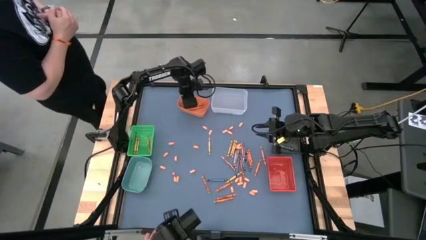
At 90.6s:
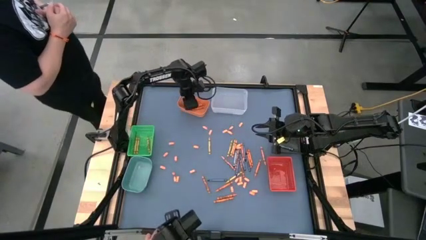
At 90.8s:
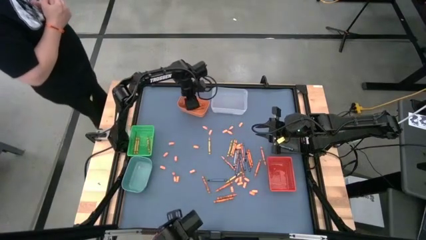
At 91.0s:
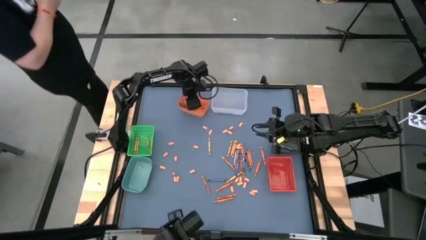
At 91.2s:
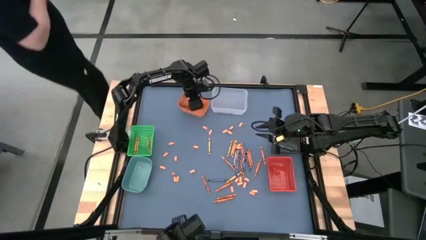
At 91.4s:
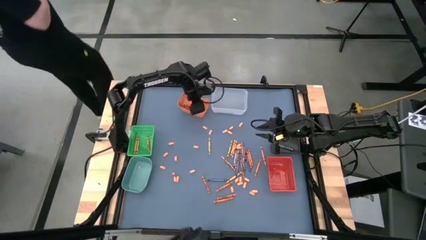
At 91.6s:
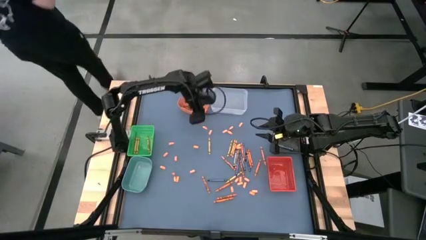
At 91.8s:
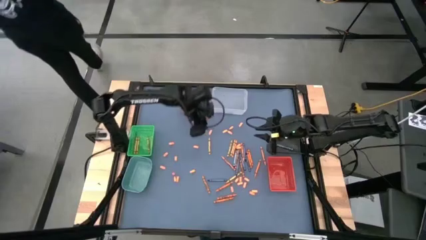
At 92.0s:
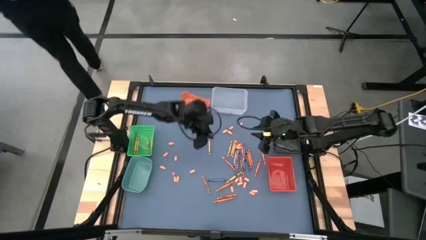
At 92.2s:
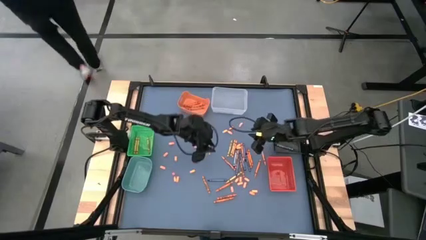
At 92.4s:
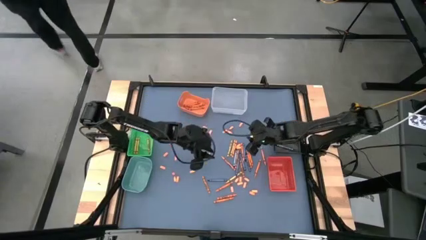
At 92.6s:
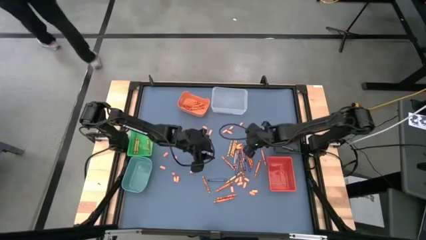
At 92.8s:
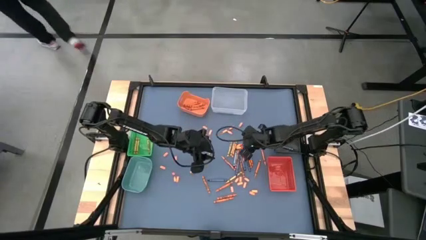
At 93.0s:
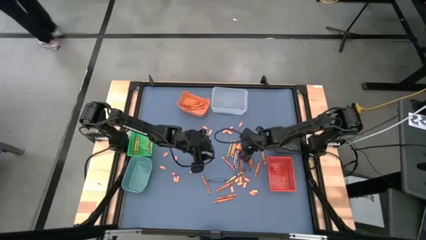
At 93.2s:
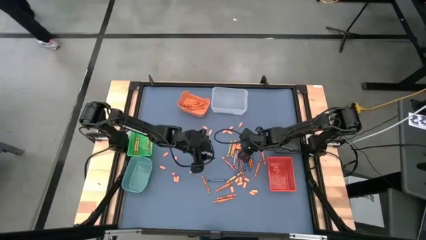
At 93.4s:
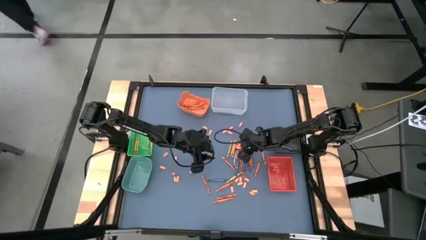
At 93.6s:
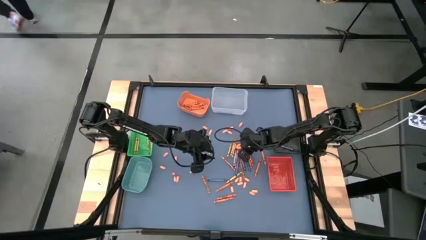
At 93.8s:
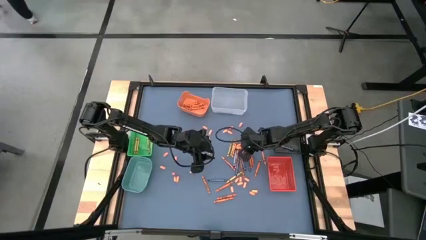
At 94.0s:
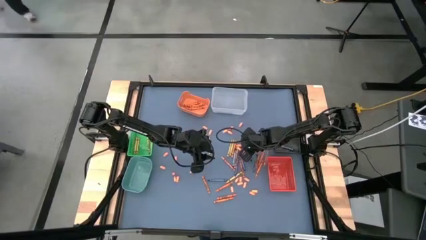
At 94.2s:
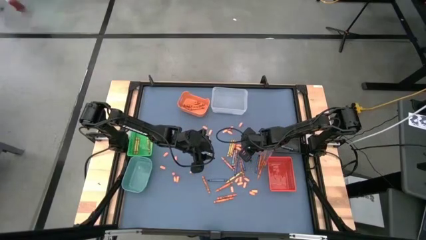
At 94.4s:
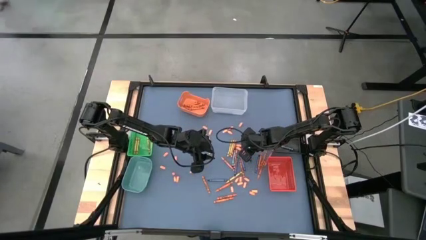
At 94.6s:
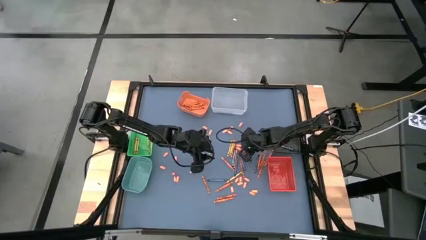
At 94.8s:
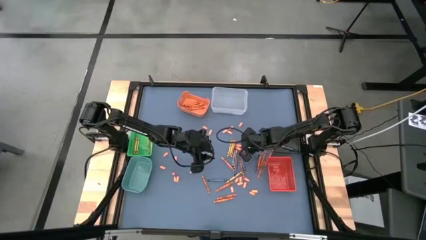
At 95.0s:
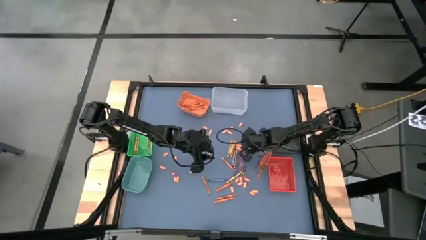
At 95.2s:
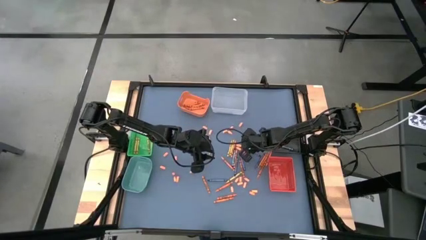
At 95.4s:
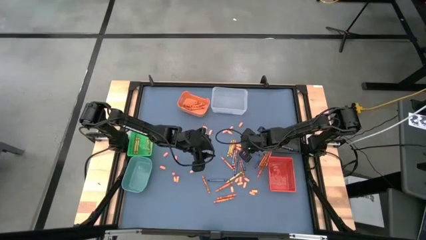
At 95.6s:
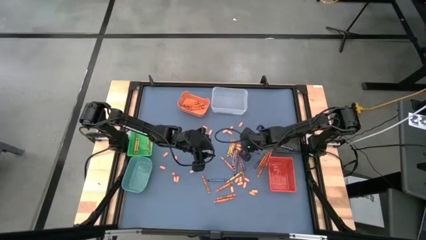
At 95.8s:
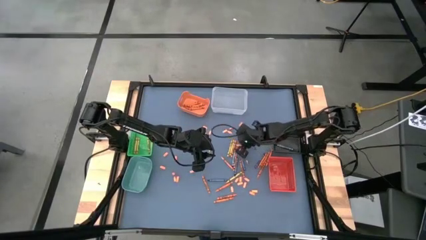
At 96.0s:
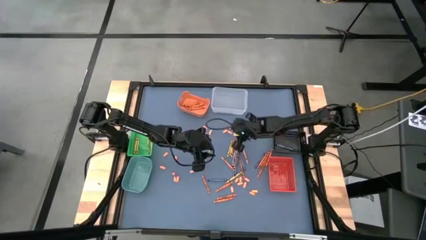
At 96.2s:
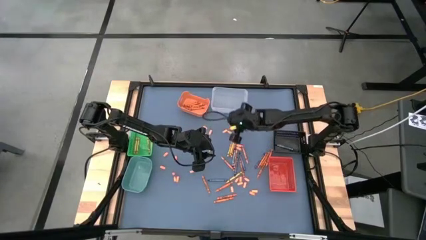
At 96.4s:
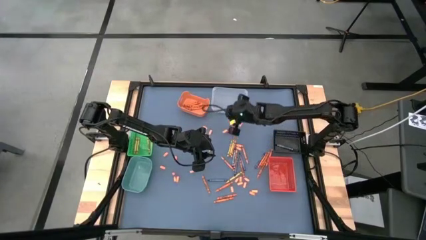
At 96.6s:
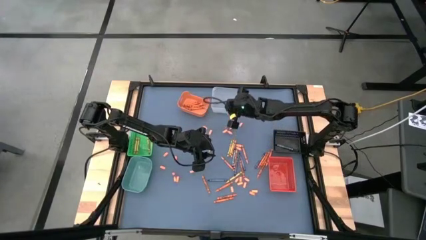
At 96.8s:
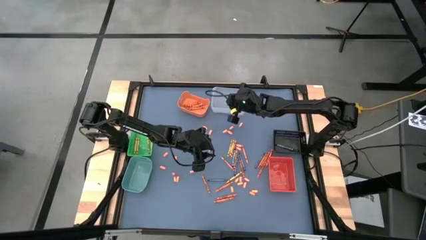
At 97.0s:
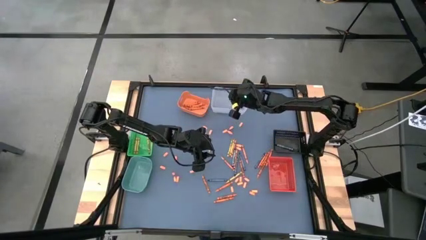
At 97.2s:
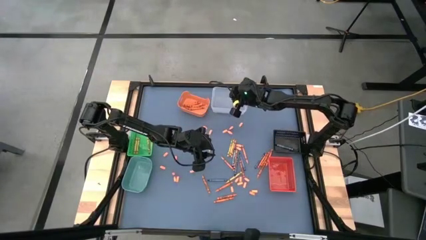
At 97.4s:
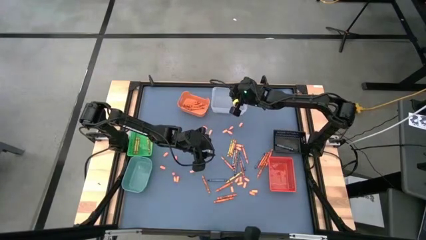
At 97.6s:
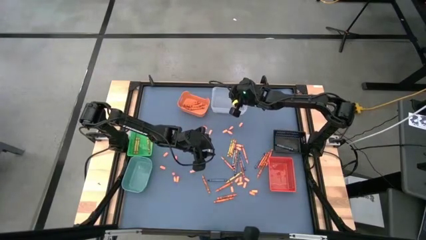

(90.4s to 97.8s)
Task: Sort crayons
Put the blue crayon into the transparent bin

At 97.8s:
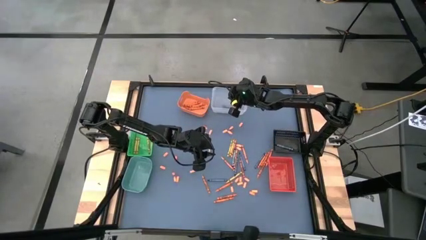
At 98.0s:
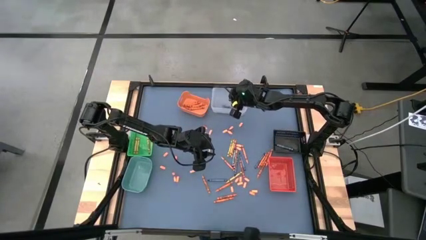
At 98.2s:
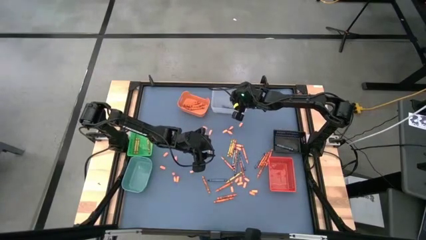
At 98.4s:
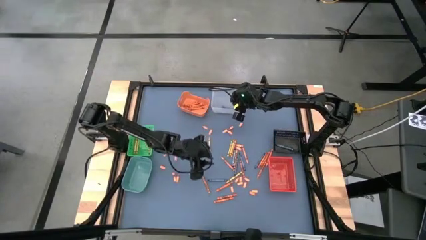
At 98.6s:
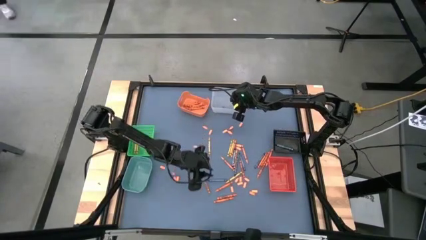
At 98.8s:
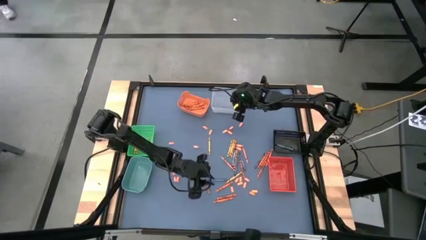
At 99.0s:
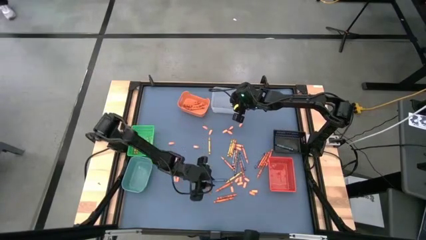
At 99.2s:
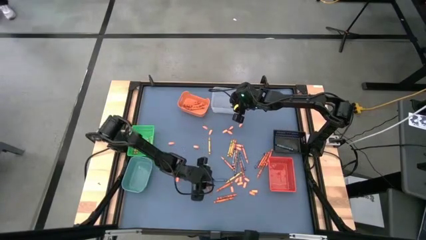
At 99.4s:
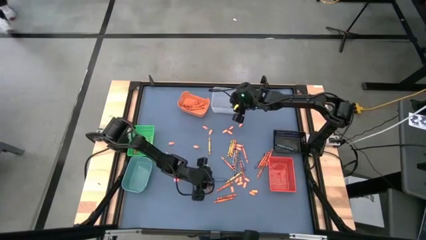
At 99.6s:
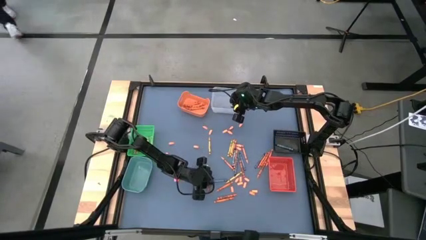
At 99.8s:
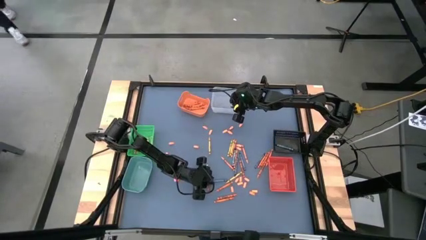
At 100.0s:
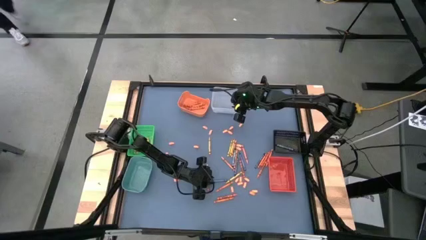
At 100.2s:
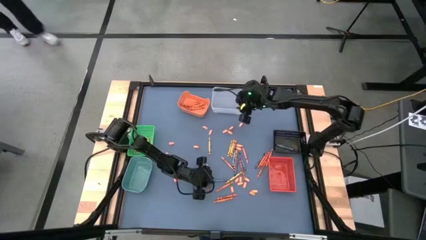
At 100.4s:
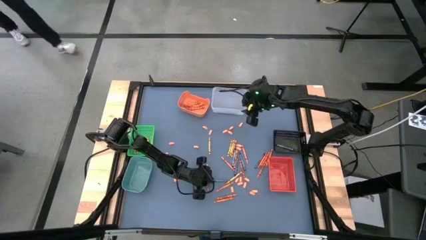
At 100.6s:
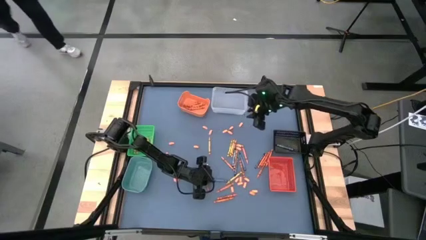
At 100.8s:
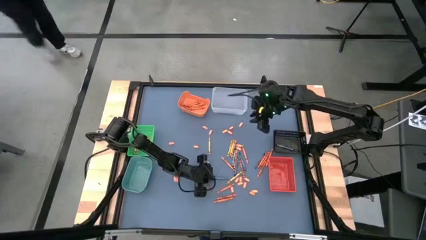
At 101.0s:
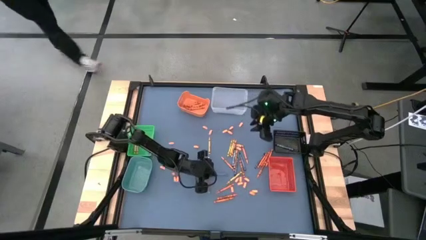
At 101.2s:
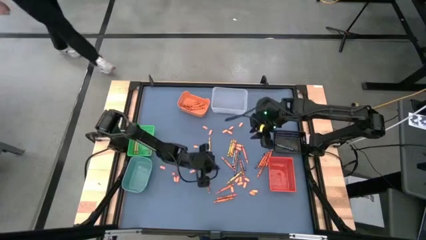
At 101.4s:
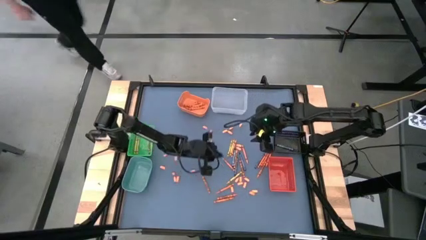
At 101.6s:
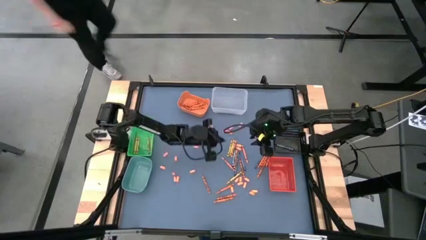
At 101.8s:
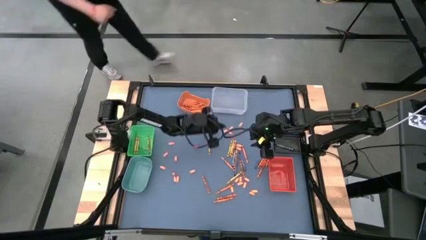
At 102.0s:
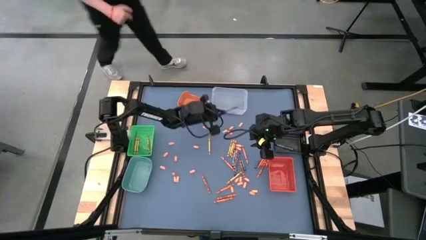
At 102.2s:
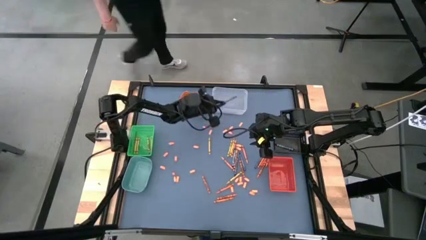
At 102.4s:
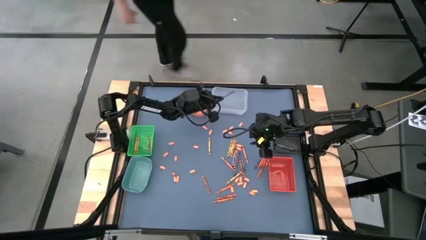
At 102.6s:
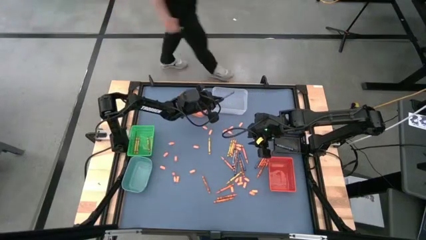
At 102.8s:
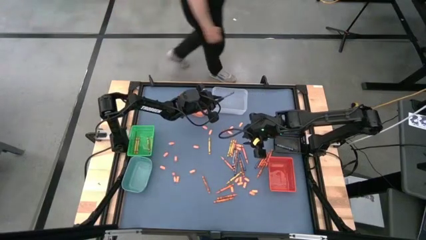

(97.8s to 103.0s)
Put the blue crayon into the transparent bin

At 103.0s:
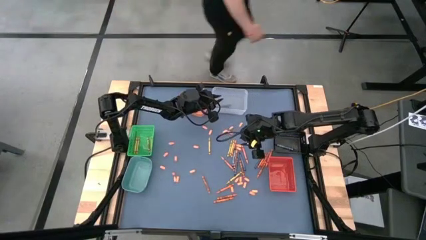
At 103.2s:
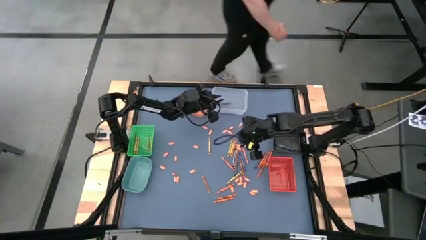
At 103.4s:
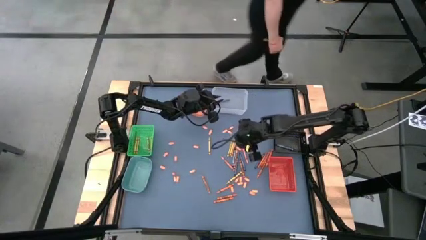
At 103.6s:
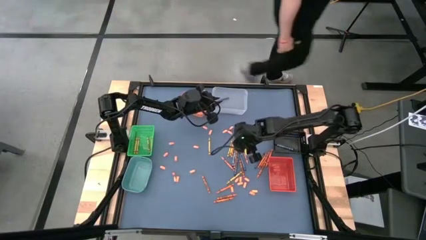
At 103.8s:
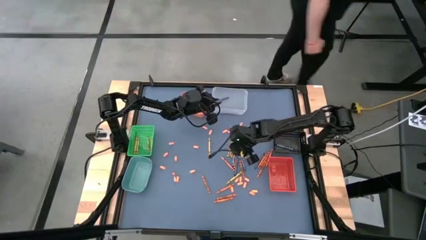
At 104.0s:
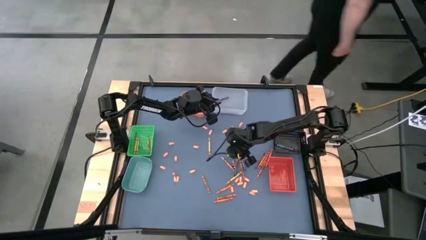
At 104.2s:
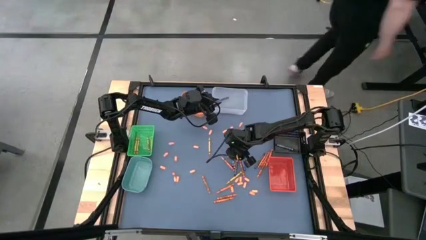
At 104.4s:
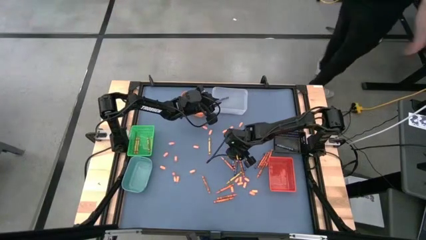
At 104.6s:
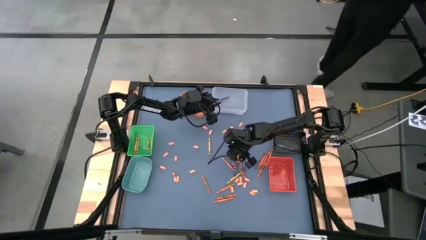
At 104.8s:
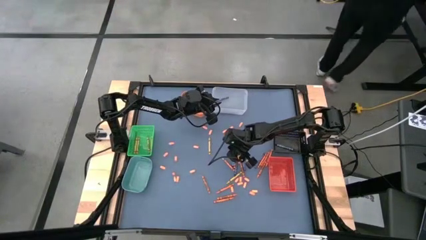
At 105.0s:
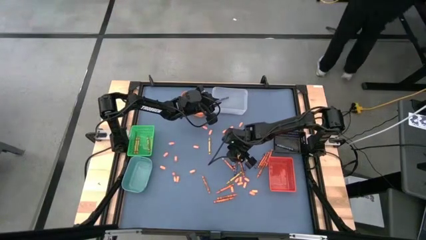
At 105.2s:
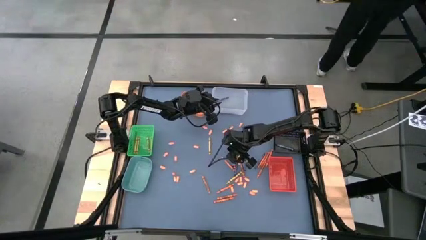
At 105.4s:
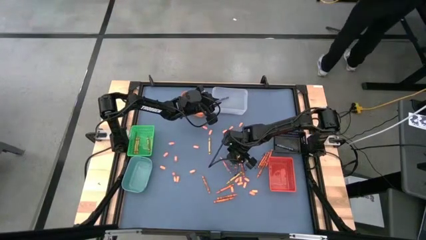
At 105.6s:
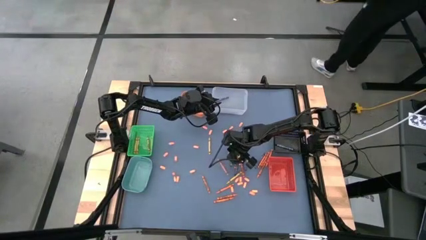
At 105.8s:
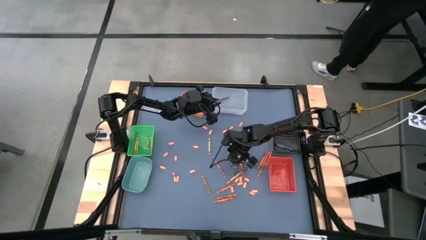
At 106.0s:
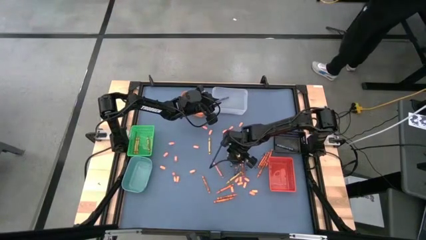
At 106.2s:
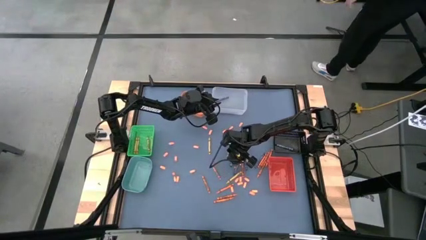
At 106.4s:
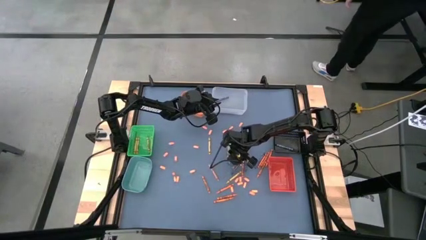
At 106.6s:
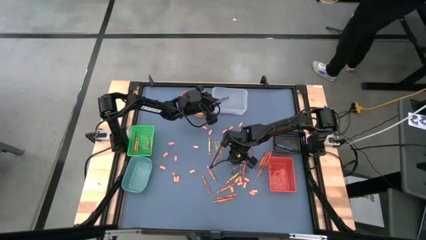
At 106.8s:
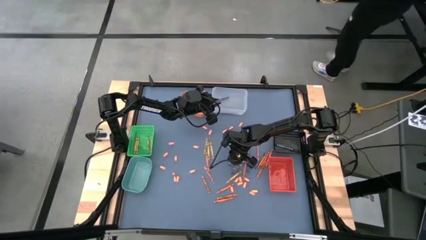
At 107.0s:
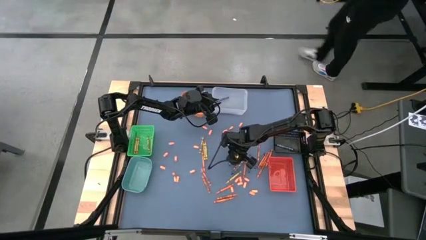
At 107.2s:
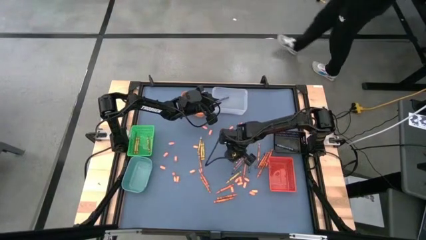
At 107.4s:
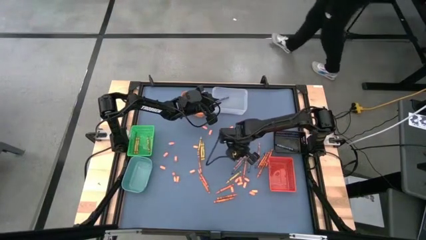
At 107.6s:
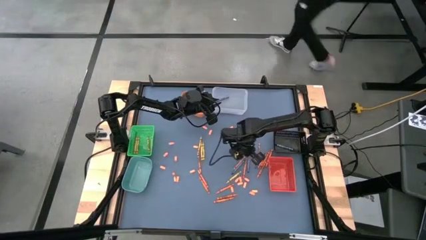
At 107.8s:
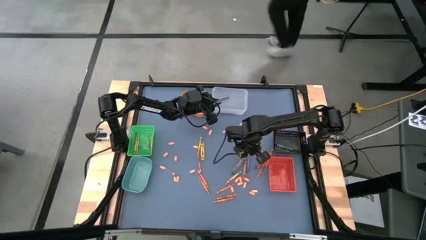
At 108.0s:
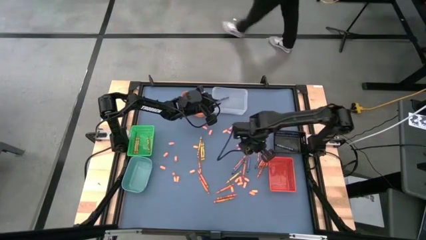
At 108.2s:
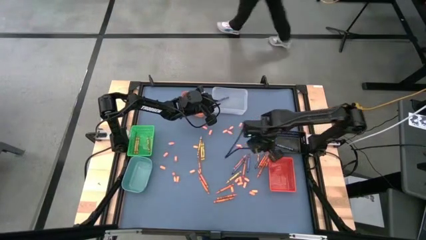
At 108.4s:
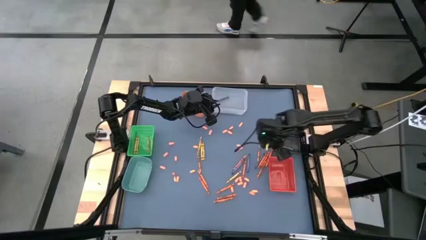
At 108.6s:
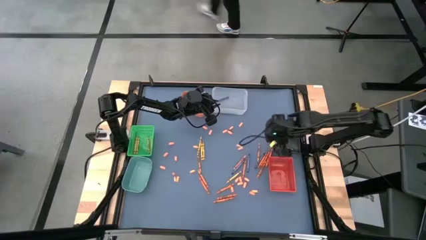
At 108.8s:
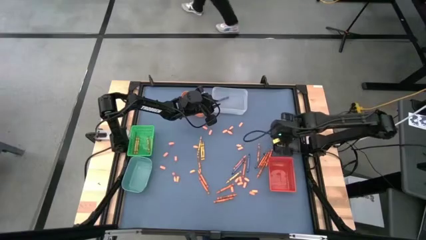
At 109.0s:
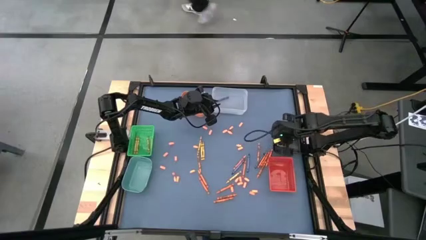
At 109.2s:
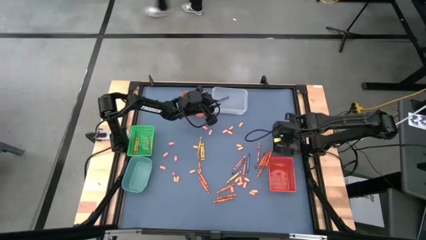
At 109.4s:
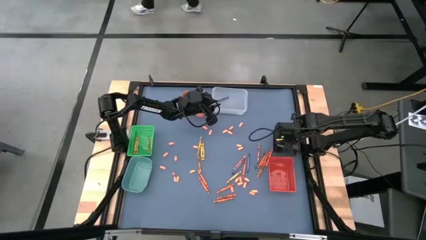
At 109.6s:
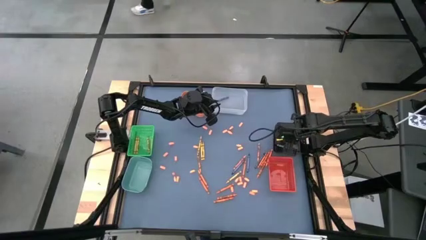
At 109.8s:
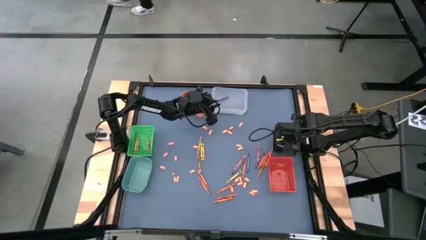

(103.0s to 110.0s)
Put the light blue crayon into the black bin
